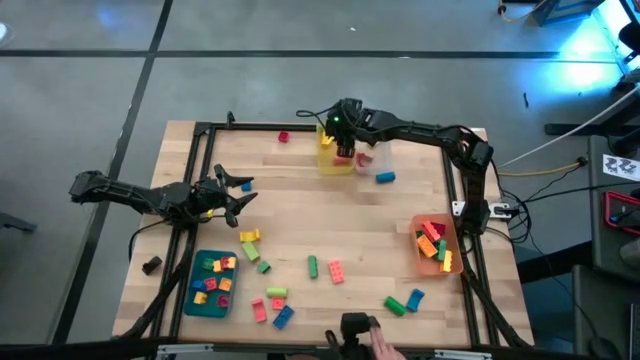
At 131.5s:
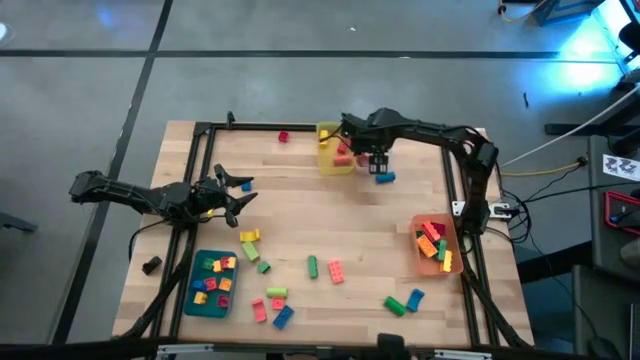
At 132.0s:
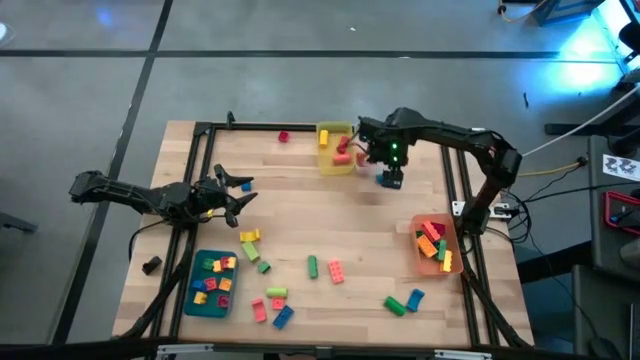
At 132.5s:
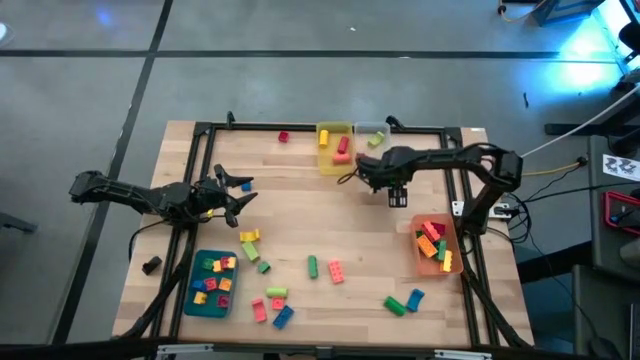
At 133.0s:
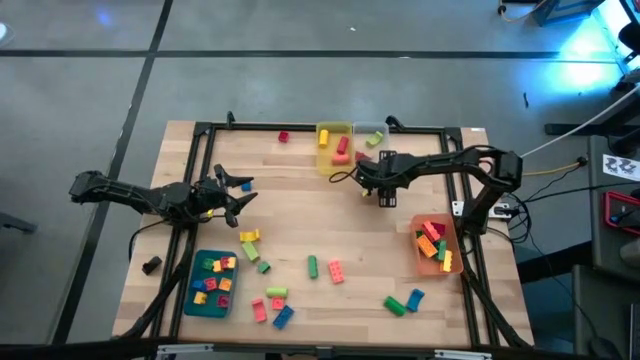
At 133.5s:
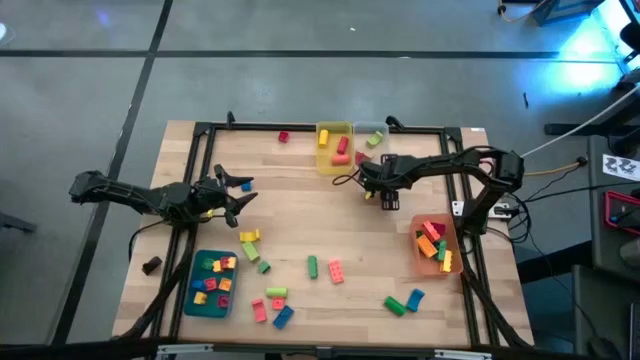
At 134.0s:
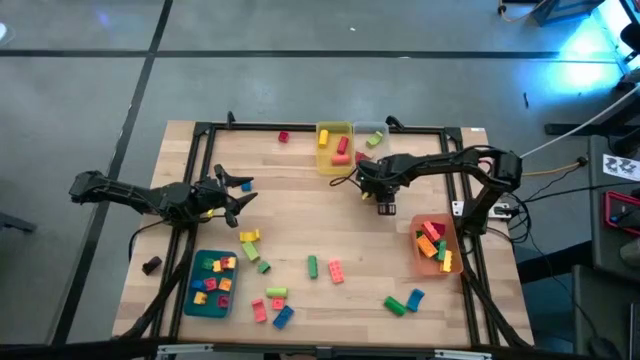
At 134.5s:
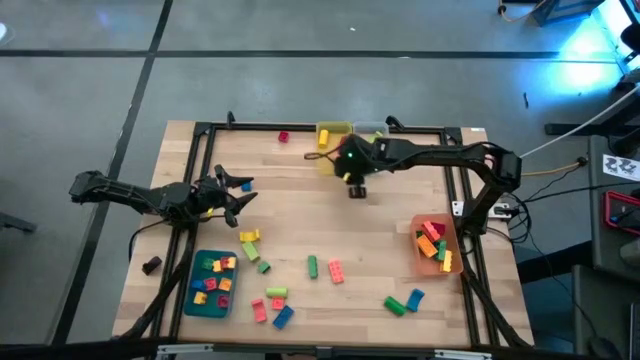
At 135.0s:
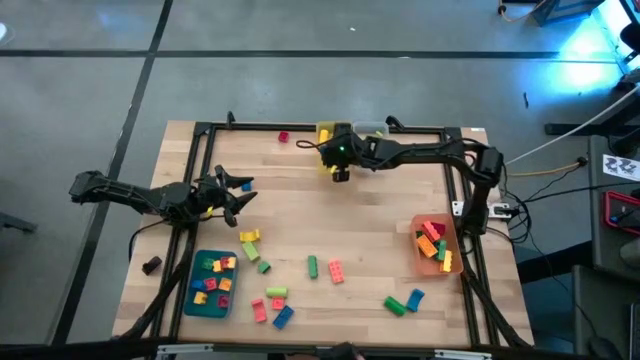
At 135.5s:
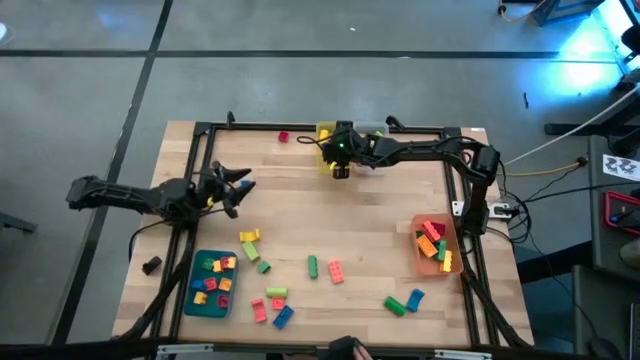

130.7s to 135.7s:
Task: Sort blocks by size
Put the blue cylindrical block into the yellow bin

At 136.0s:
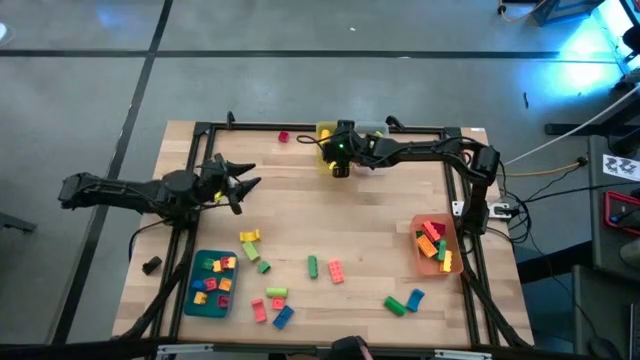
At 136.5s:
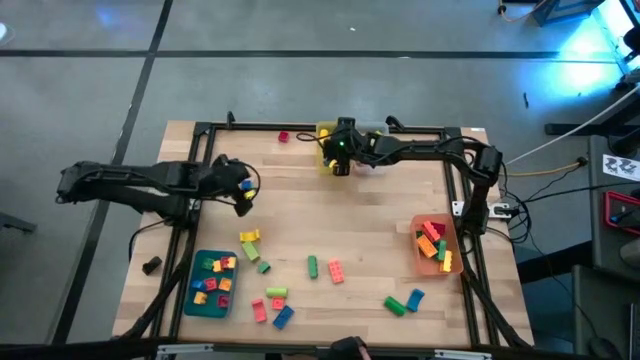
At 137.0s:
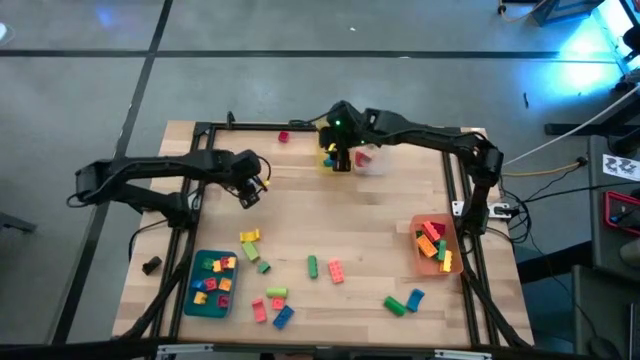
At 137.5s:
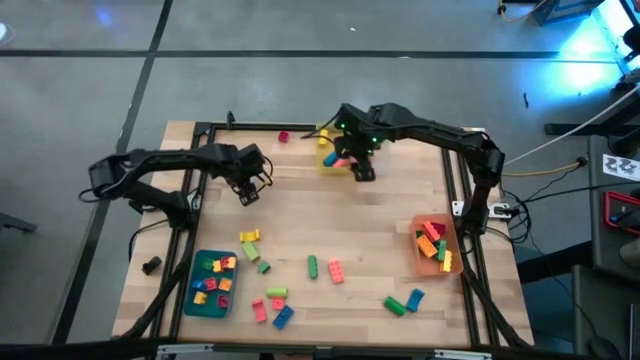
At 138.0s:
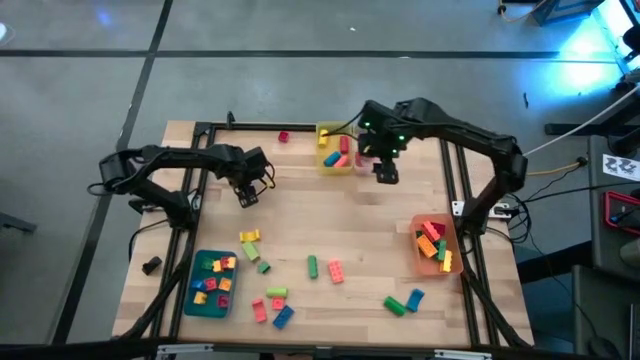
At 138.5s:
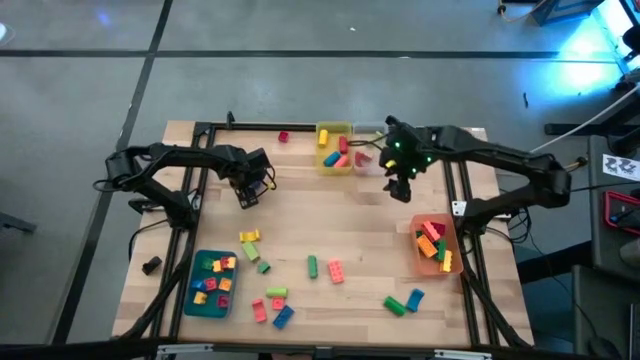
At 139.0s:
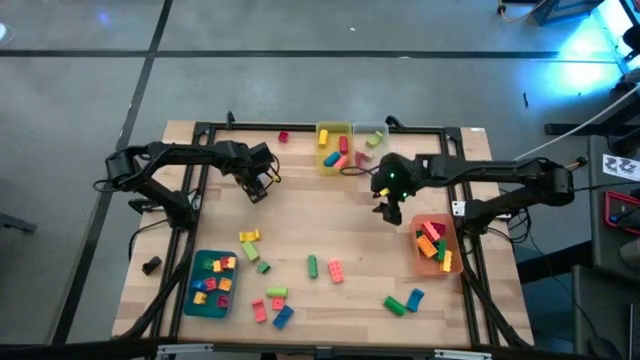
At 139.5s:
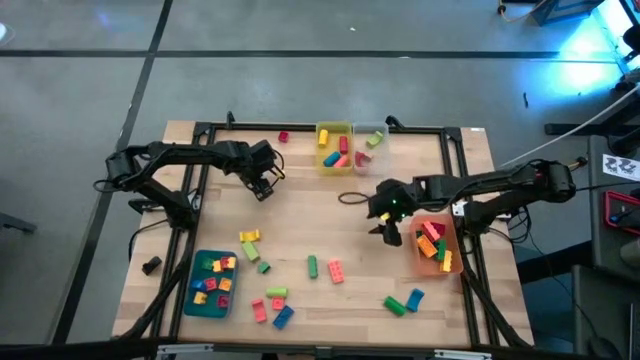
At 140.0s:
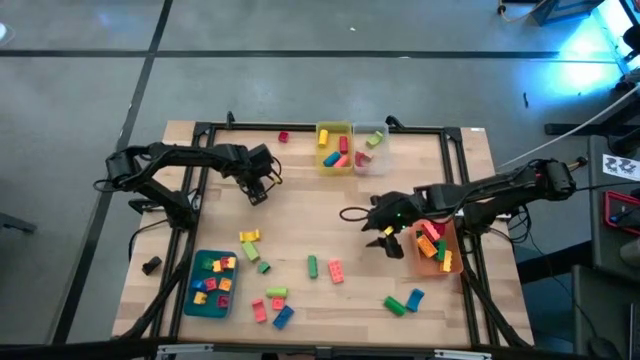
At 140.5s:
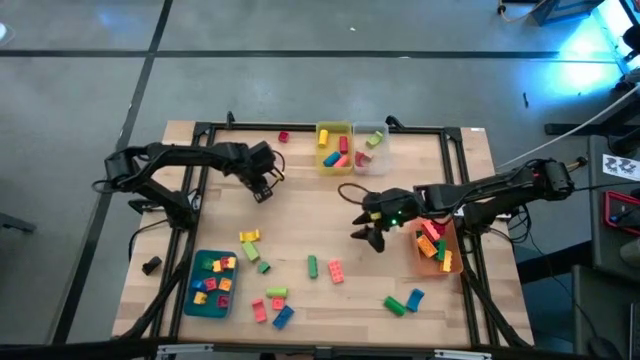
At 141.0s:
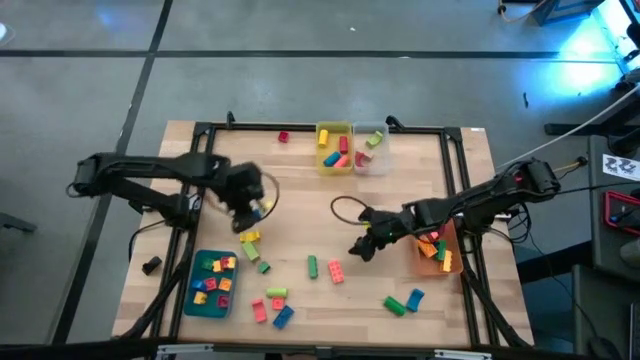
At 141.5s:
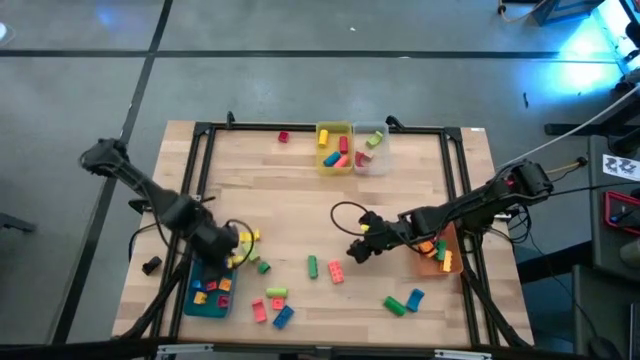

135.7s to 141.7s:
Put the blue square game piece into the blue bin

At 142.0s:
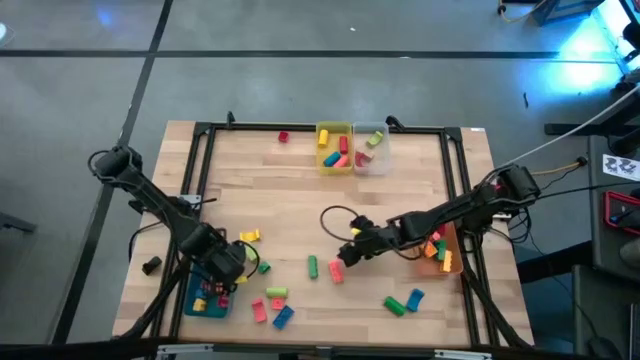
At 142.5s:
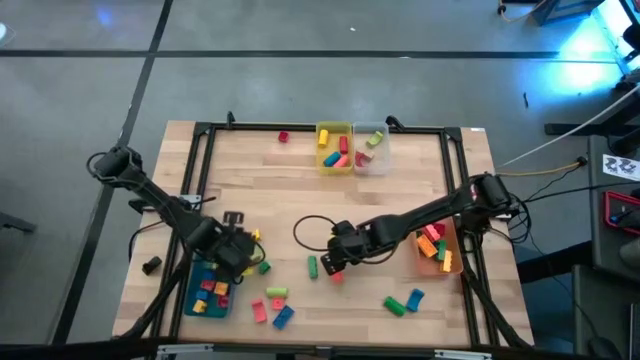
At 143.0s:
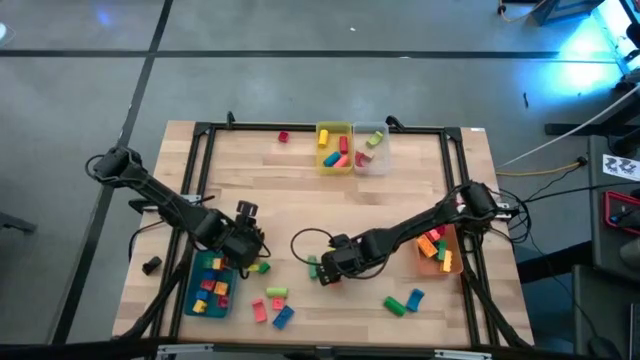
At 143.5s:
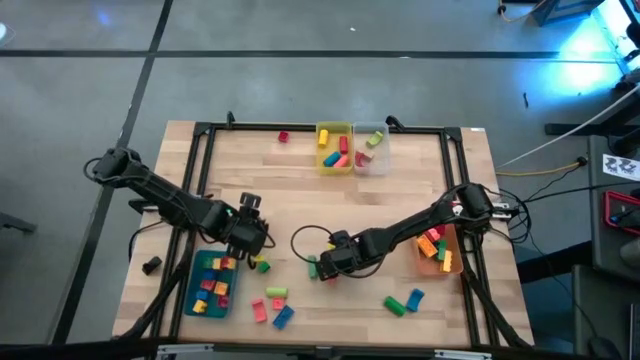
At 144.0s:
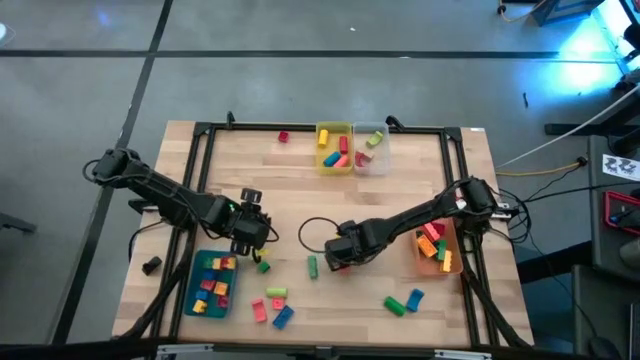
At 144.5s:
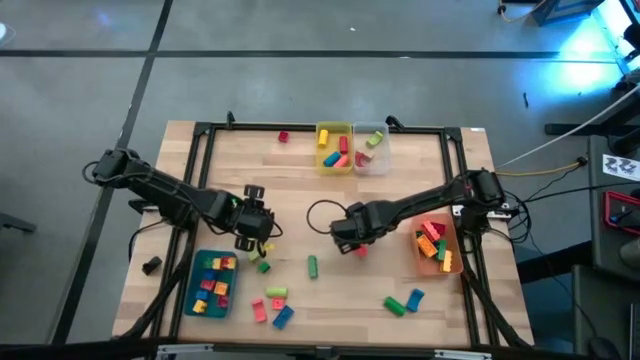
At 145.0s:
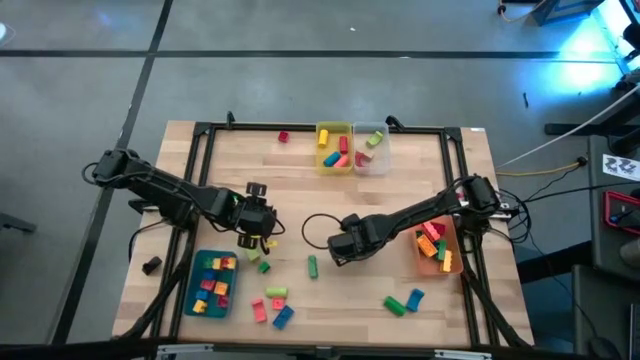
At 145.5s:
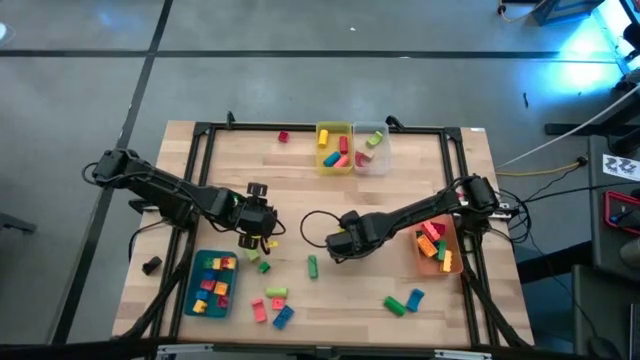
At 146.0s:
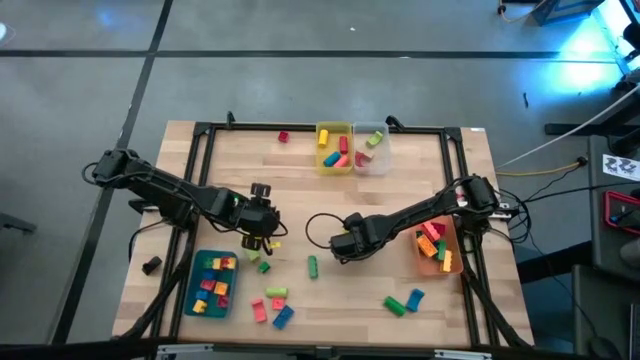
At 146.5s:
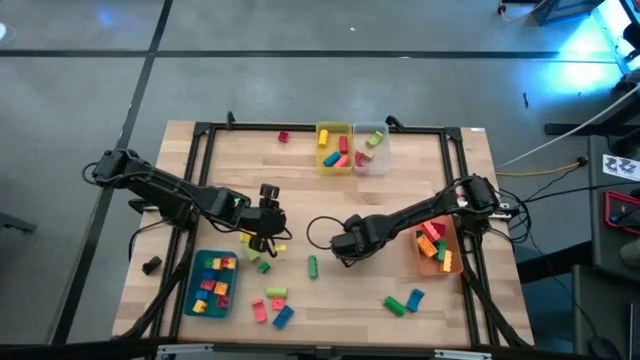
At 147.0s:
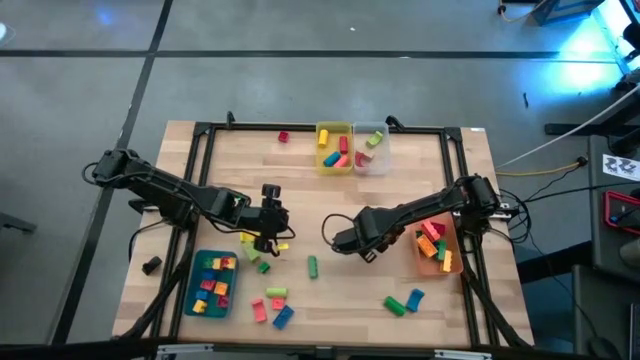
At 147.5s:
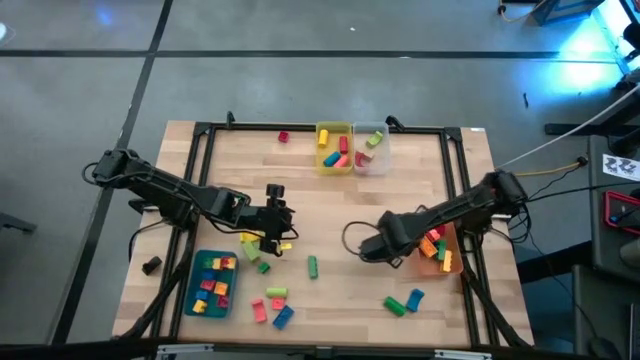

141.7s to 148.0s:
Put the orange rectangular game piece into the orange bin

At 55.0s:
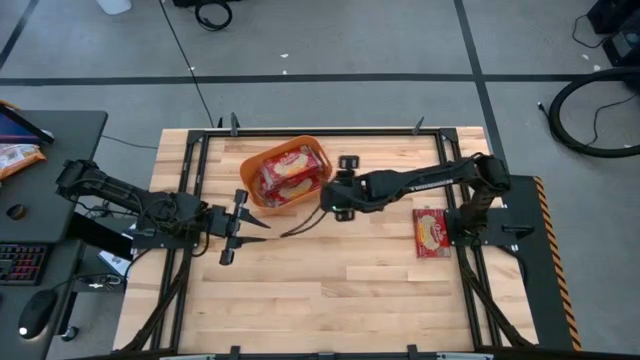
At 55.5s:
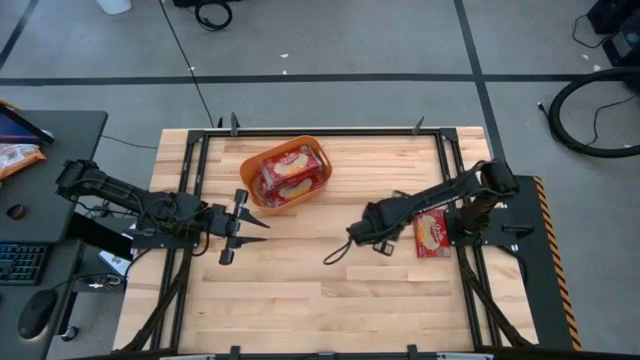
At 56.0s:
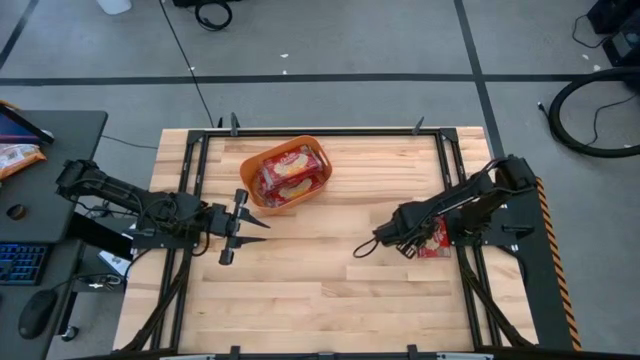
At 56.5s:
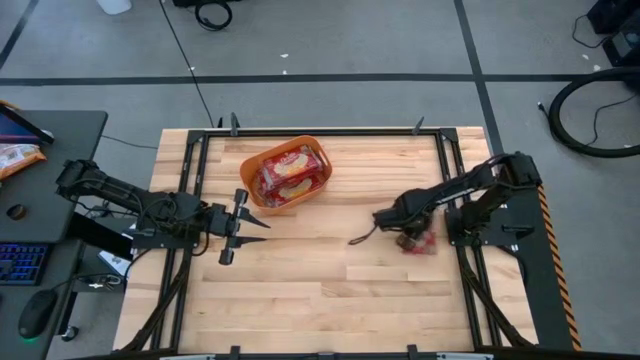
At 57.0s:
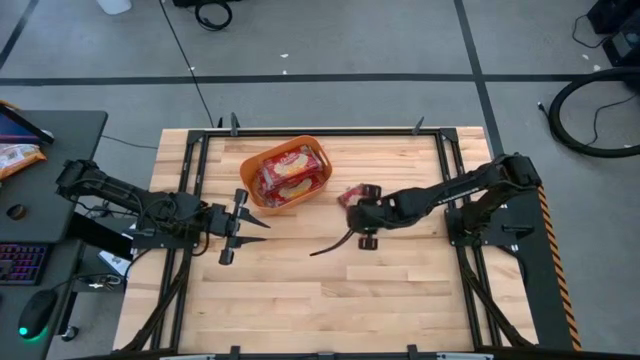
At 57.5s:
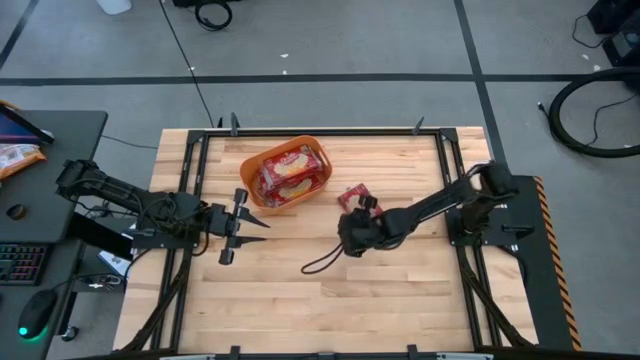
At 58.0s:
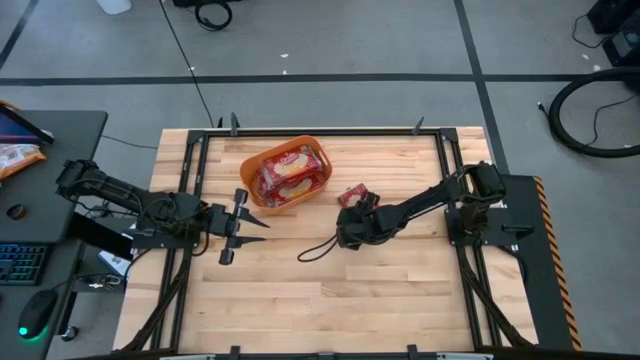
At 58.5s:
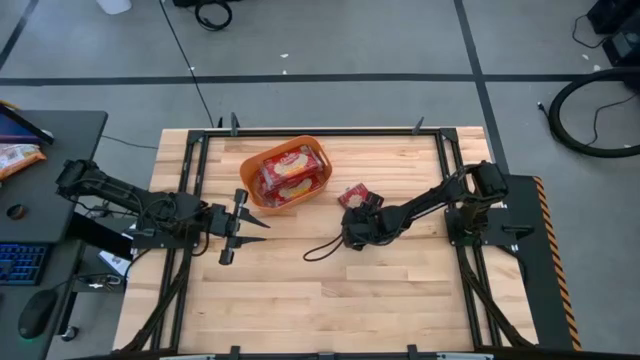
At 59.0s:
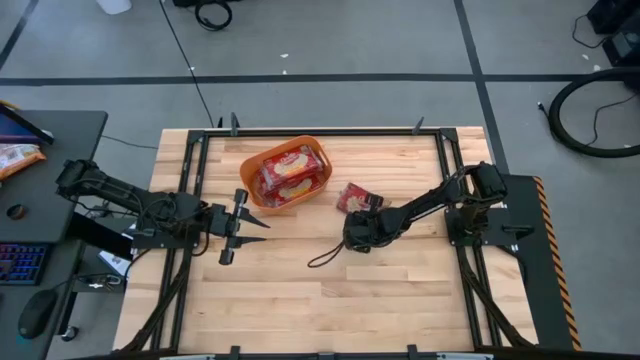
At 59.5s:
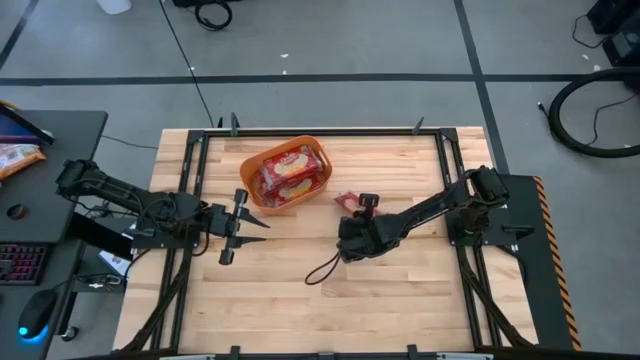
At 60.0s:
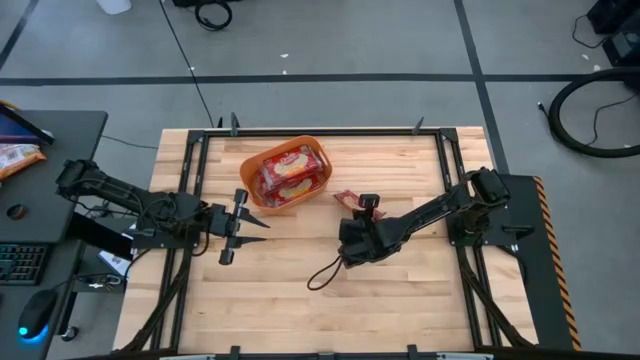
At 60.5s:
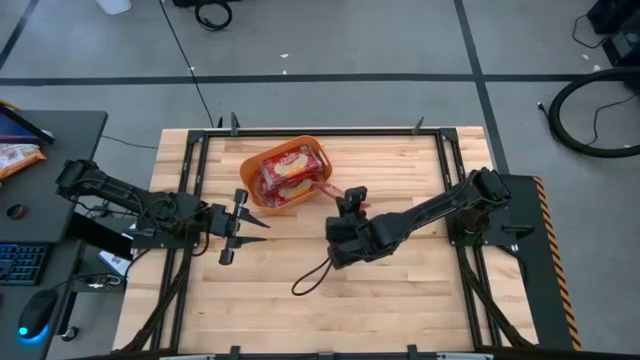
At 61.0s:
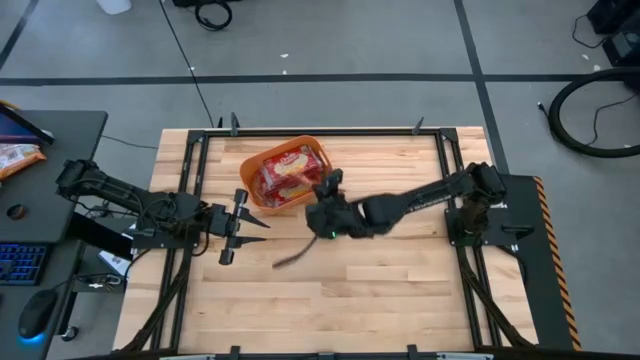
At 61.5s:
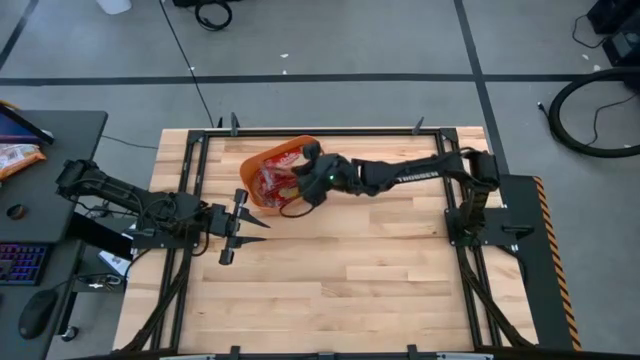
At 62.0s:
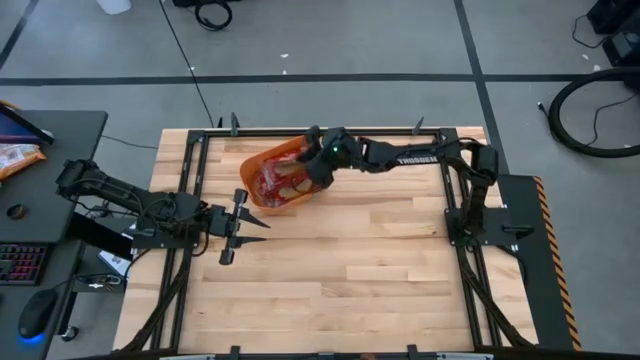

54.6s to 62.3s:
Task: Sort popcorn bags into baskets
Put the red popcorn bag into the orange bin
